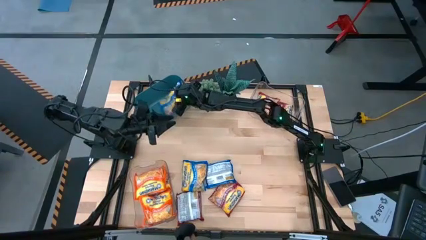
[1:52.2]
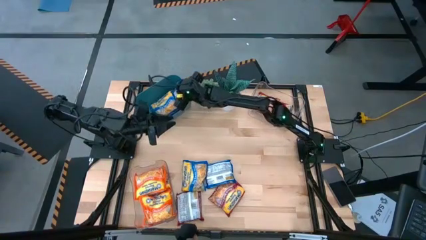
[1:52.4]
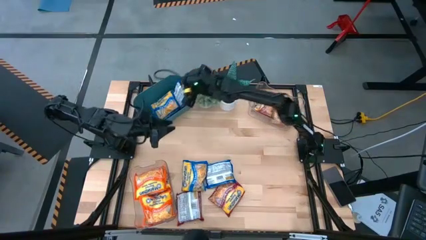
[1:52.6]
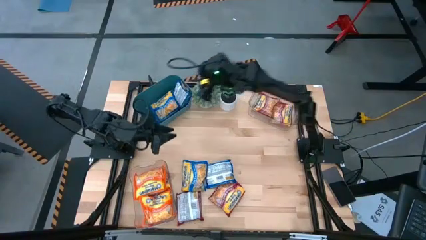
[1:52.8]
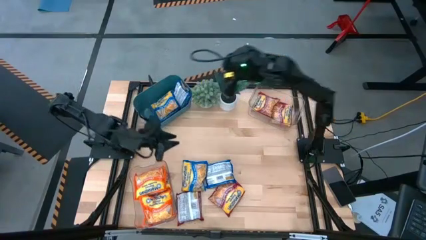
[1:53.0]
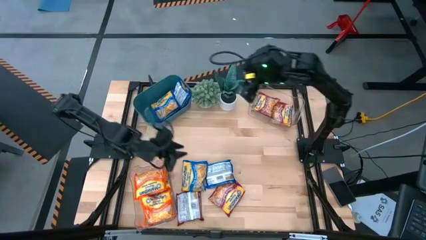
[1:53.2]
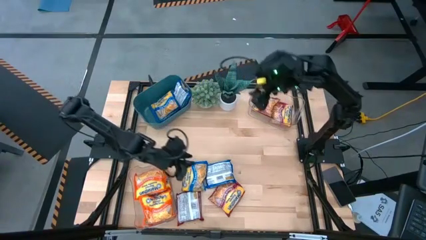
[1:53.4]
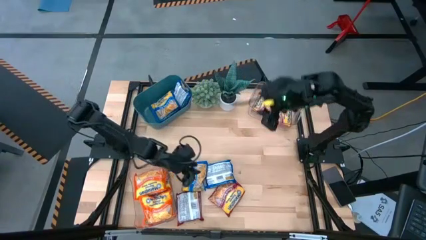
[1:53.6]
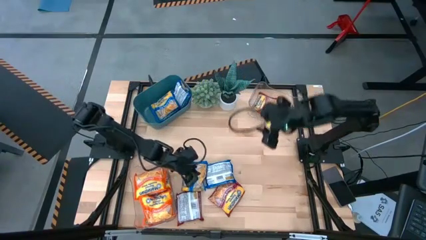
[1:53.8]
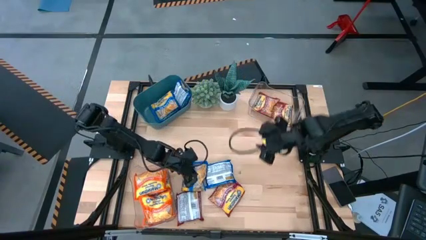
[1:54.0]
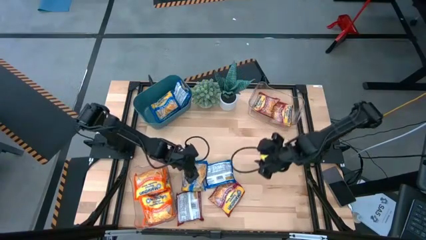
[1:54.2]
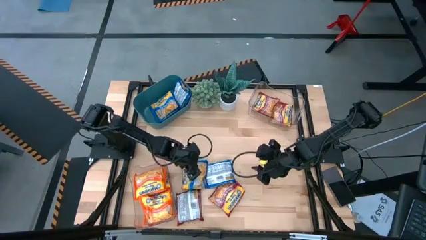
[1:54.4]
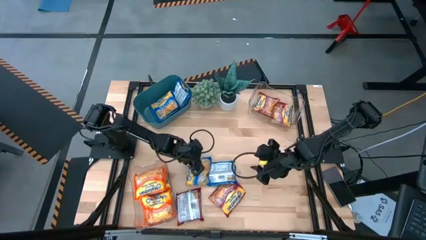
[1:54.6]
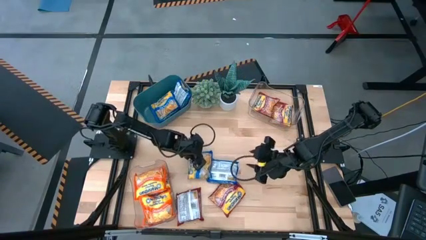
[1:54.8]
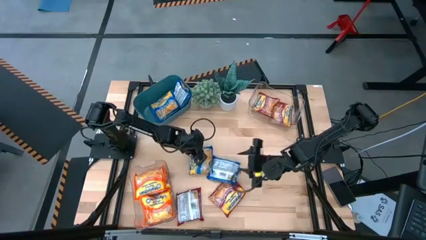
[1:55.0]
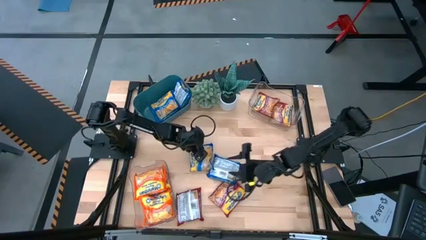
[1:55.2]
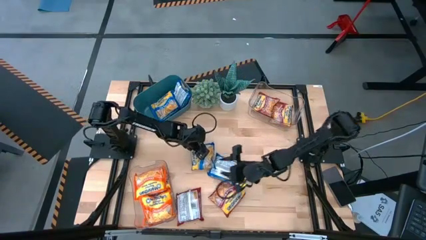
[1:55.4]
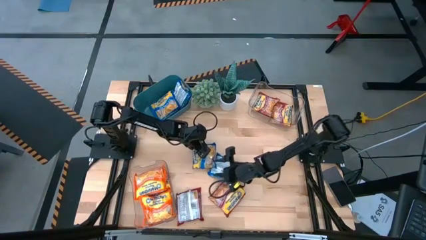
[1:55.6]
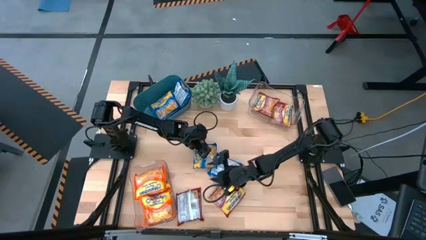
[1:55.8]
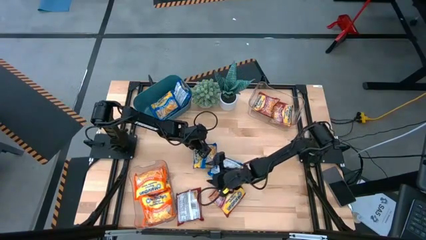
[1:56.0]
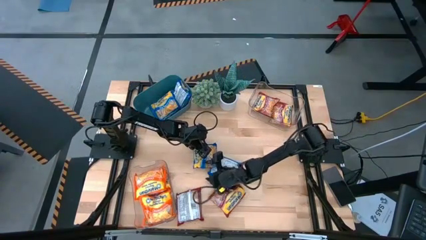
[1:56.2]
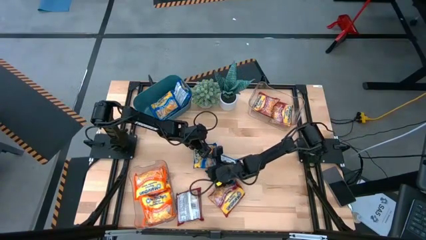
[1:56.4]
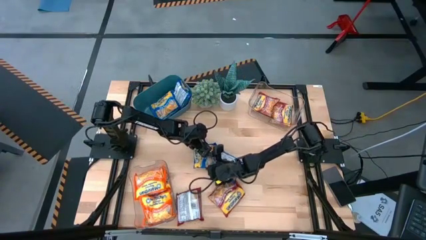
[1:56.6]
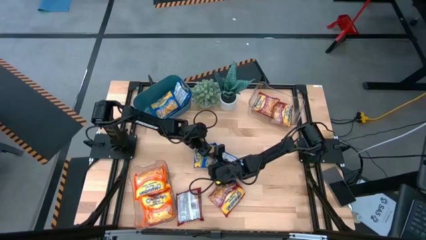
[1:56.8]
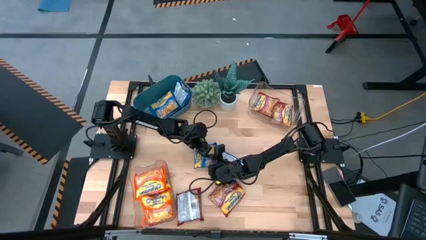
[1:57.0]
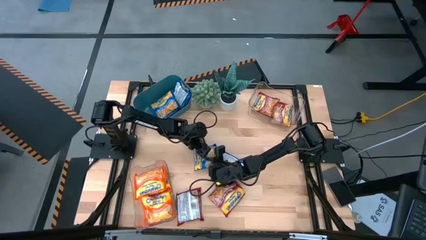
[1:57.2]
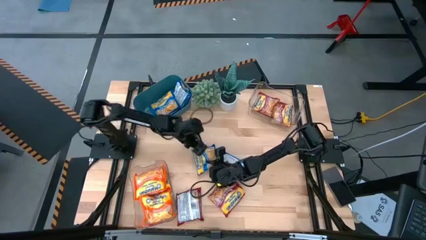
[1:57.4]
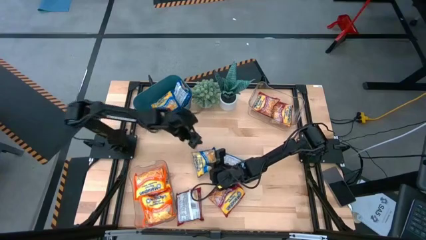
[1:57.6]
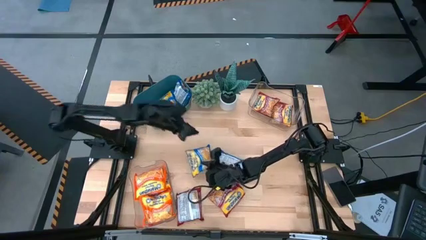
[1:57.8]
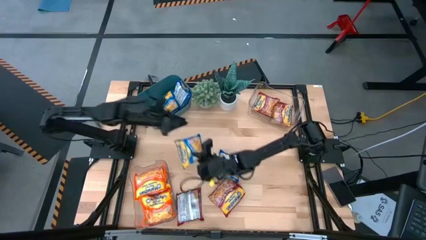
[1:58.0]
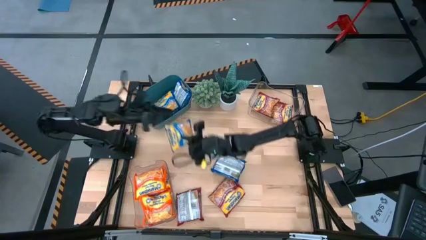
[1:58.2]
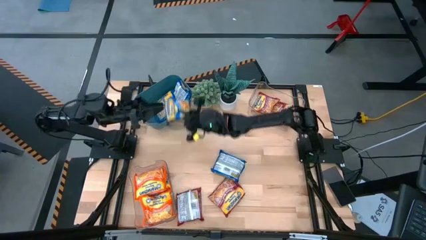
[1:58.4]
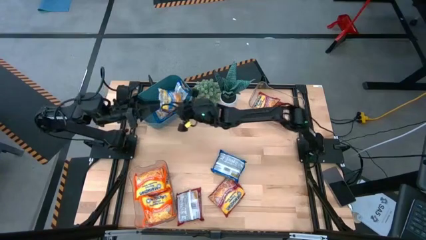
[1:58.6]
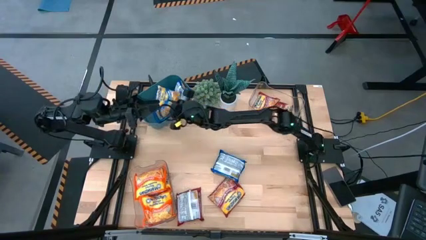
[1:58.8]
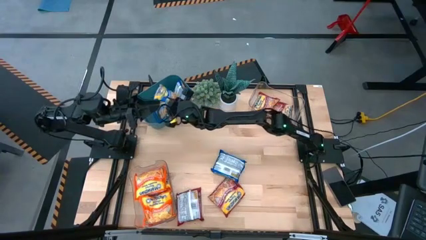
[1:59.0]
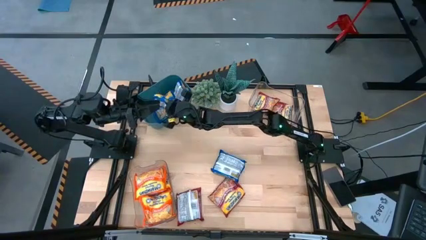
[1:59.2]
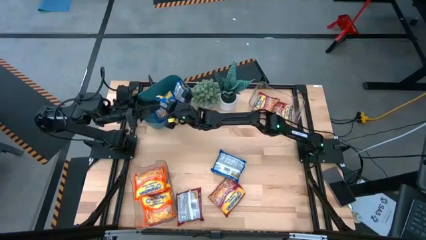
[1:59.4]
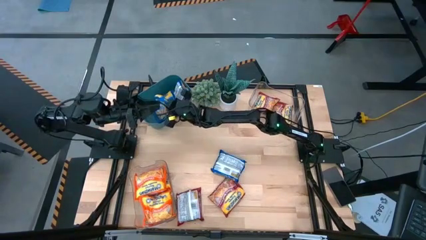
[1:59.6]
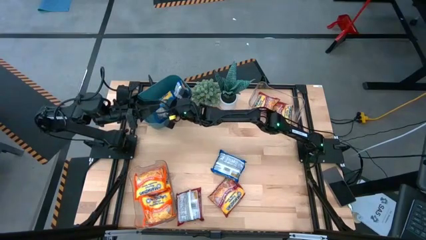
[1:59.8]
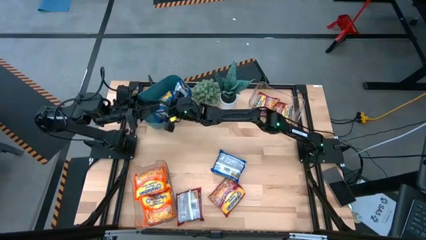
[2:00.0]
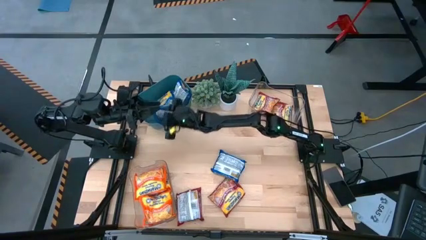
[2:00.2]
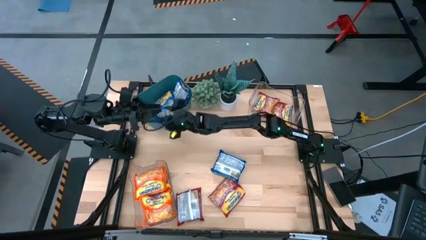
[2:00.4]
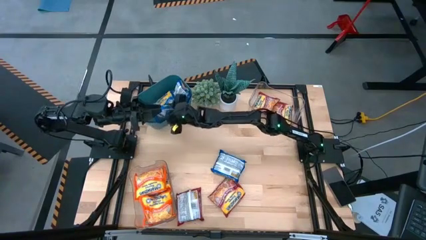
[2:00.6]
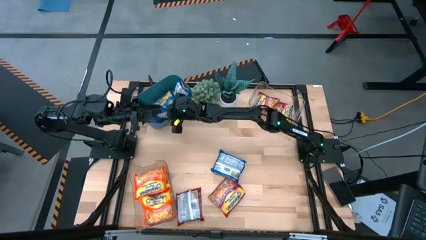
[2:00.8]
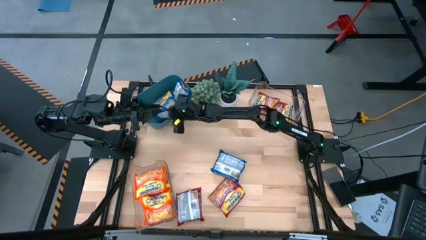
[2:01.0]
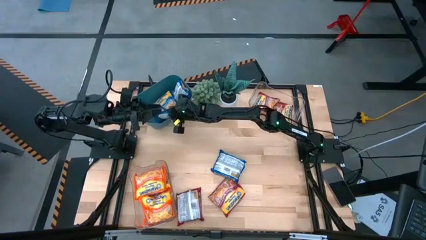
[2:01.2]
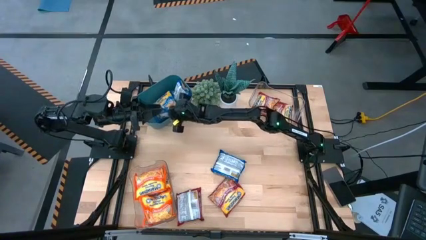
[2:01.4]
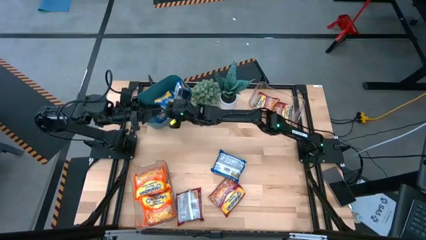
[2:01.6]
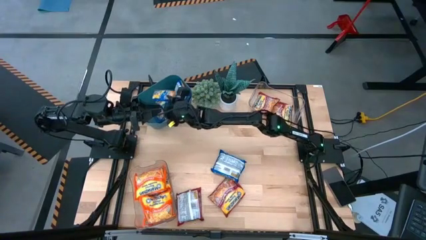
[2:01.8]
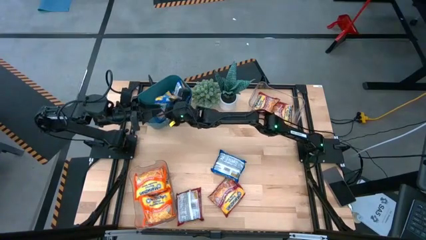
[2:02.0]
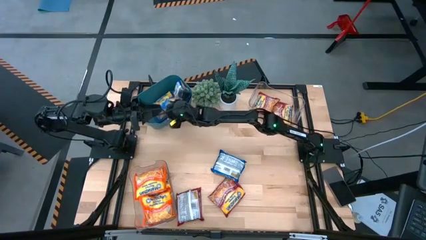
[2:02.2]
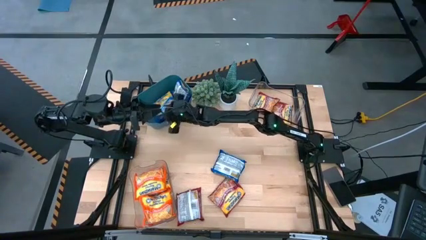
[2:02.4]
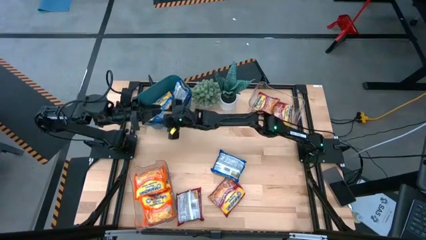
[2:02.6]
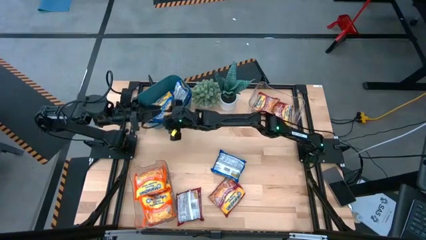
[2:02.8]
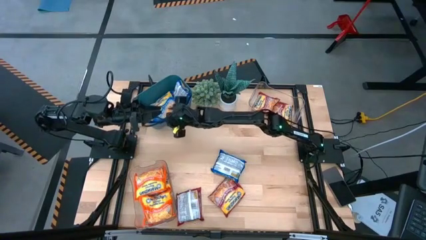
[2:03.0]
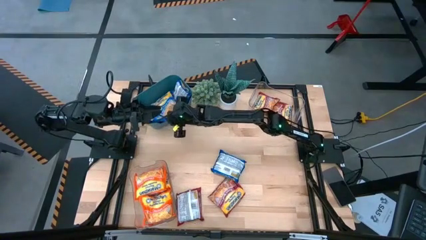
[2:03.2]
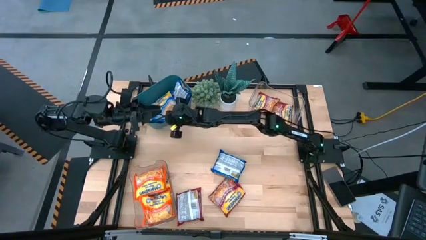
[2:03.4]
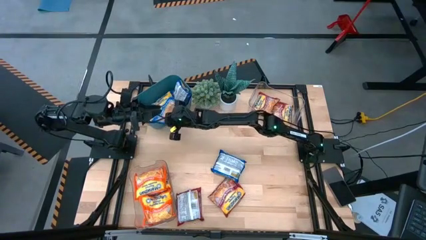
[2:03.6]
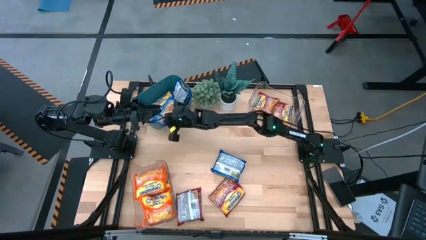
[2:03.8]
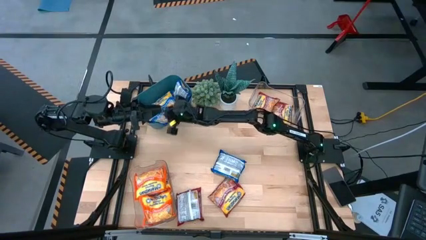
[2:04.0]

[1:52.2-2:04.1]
Task: Sort Maruchan noodles
Put the blue noodle pack into the green bin

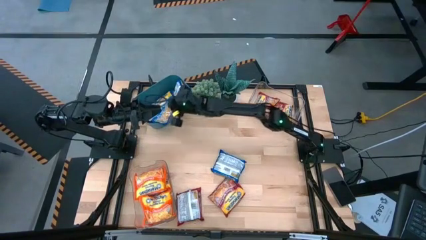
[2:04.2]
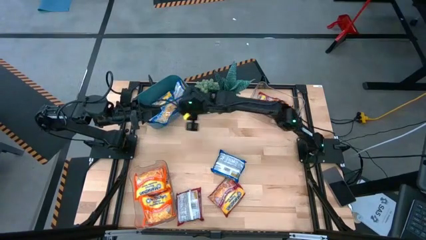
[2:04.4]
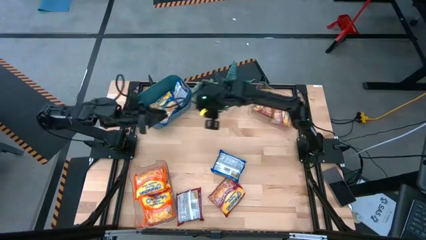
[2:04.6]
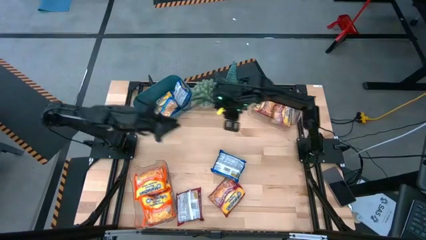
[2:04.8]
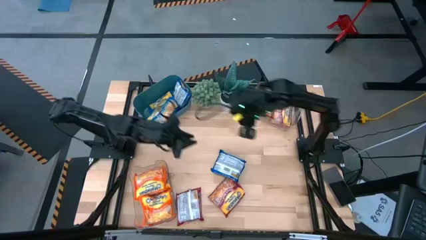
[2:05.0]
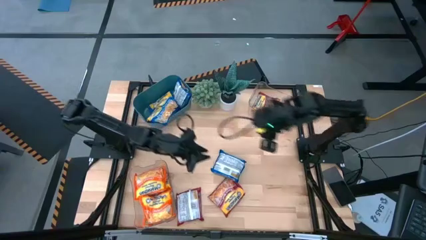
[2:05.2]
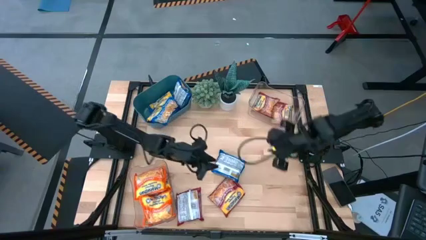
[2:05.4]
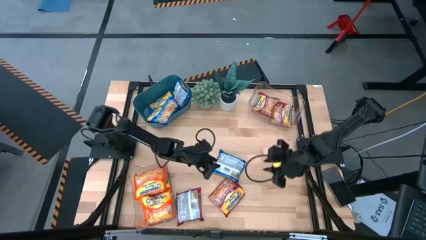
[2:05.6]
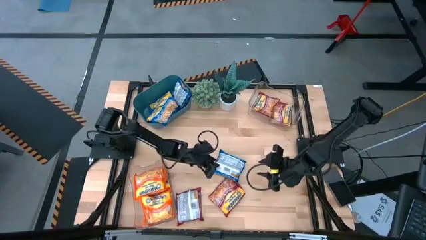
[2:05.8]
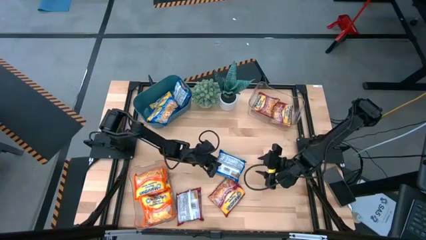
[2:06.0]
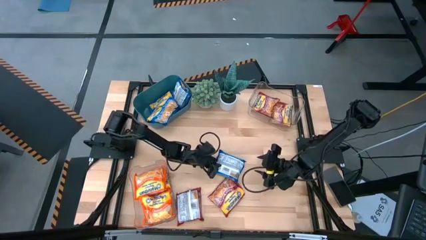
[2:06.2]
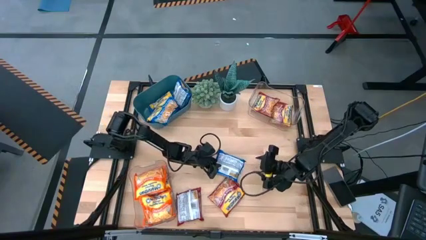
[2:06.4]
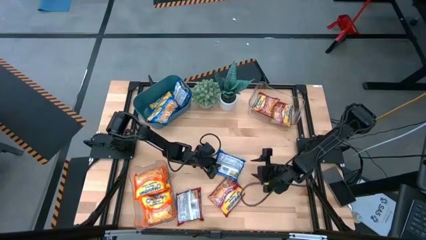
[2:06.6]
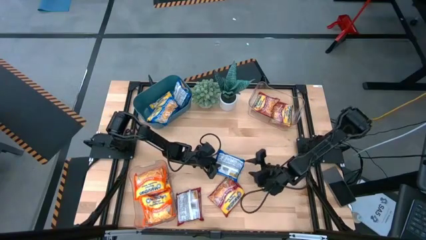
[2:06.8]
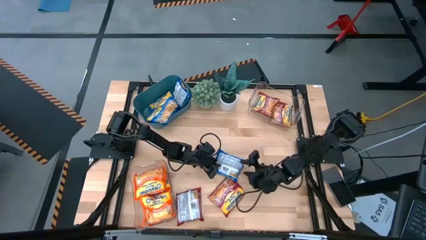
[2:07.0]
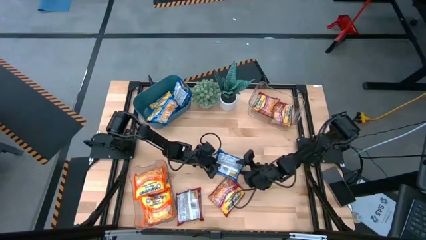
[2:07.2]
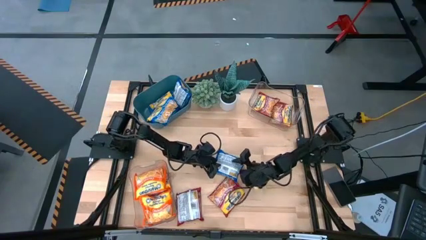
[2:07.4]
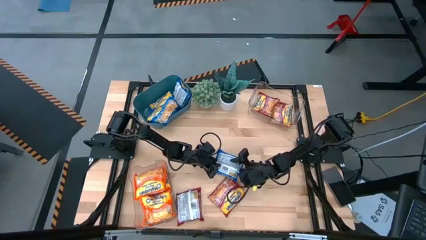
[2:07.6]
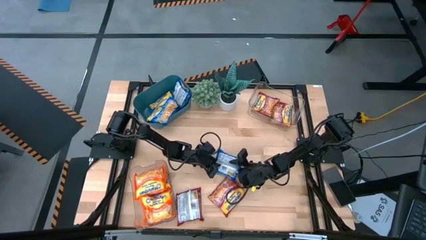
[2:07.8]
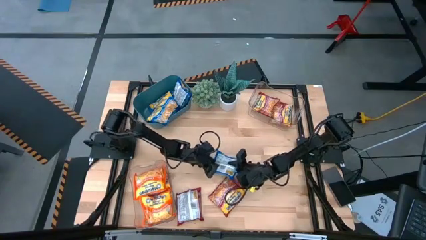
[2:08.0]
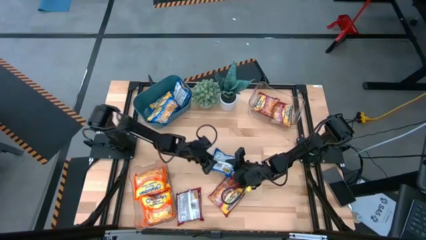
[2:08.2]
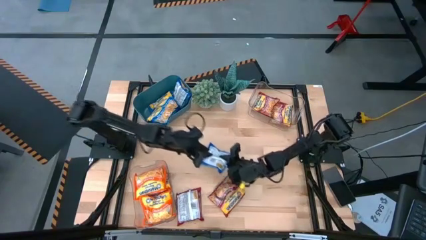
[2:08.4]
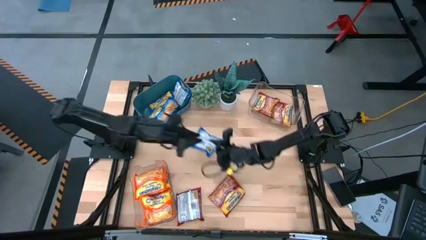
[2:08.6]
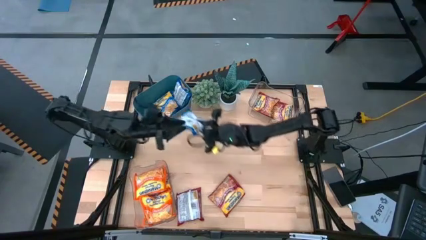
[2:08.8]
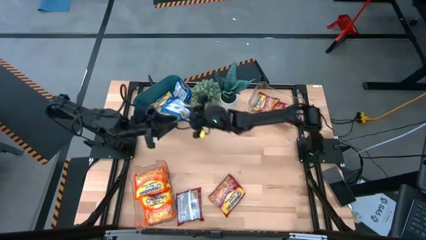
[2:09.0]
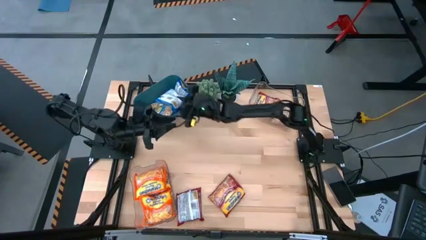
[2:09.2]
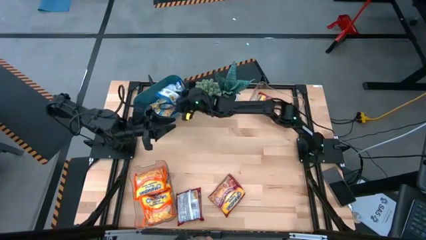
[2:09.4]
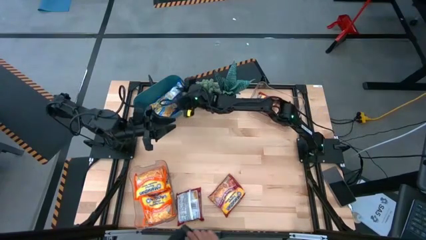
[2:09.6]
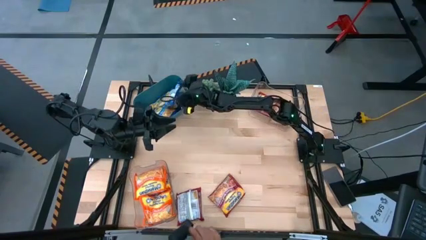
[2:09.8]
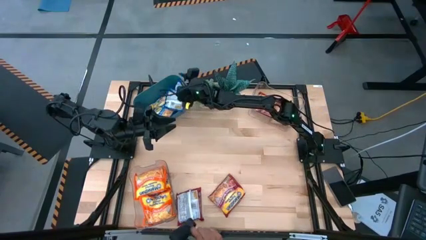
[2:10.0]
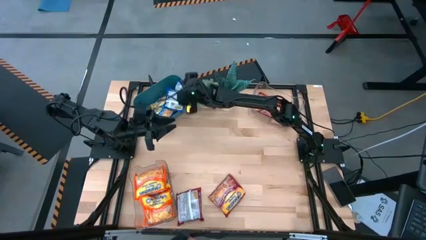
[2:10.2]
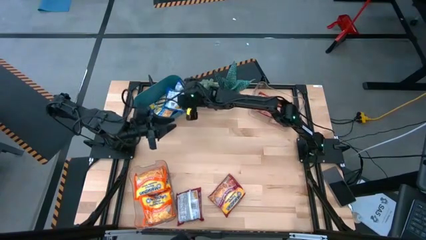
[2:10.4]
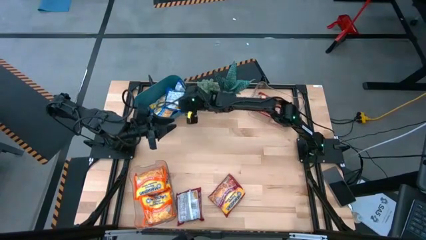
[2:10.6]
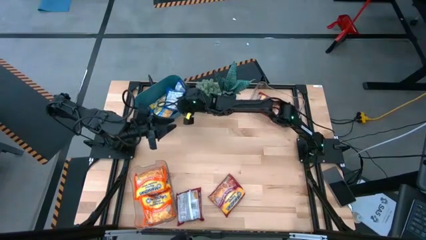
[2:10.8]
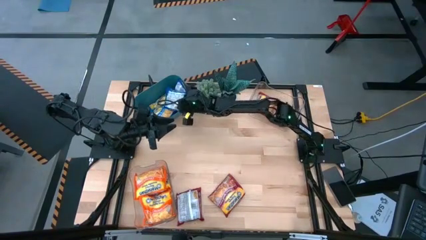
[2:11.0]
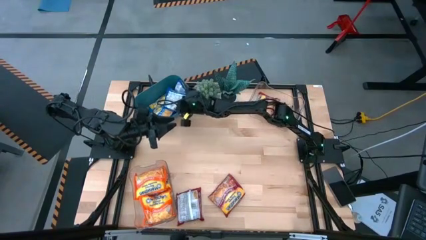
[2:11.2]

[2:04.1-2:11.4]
Put the blue noodle pack into the green bin
